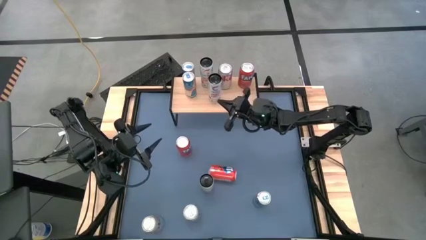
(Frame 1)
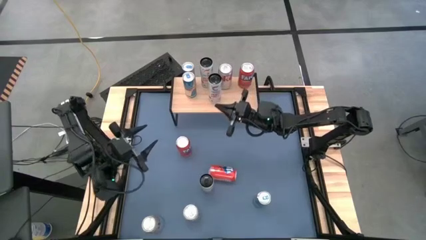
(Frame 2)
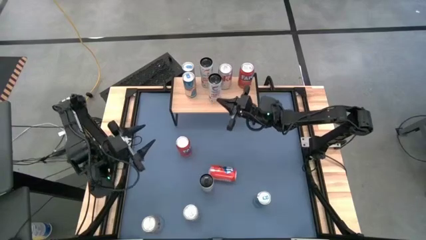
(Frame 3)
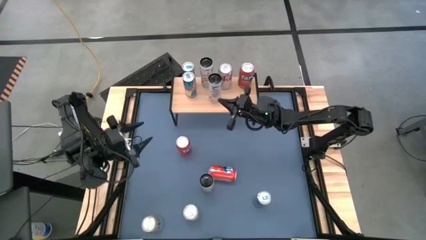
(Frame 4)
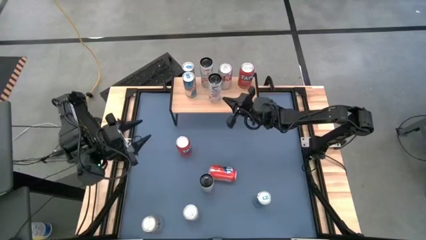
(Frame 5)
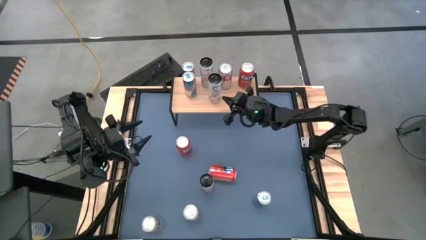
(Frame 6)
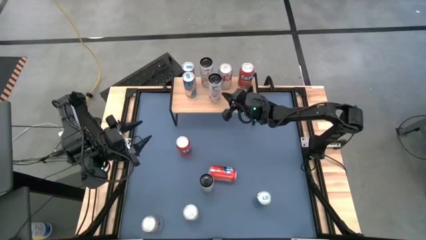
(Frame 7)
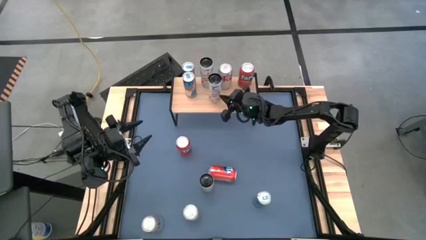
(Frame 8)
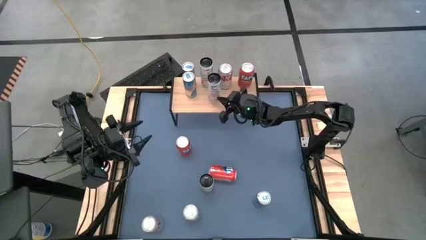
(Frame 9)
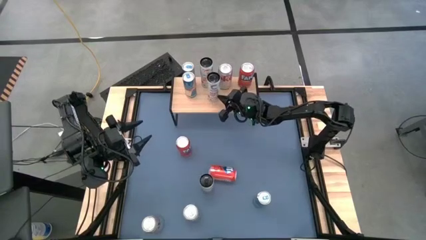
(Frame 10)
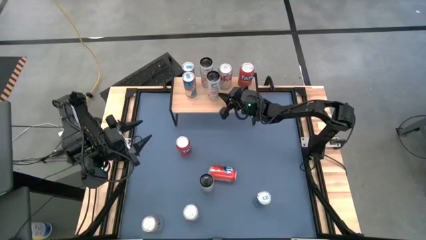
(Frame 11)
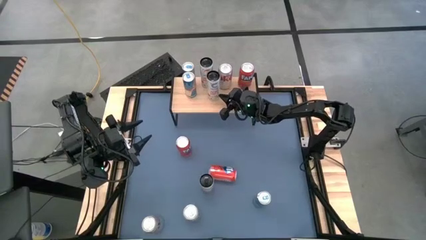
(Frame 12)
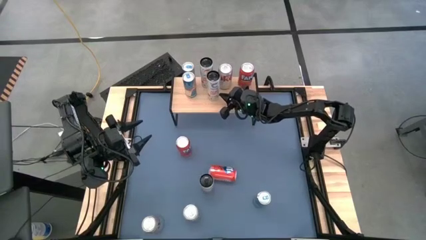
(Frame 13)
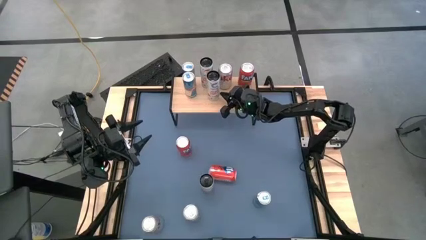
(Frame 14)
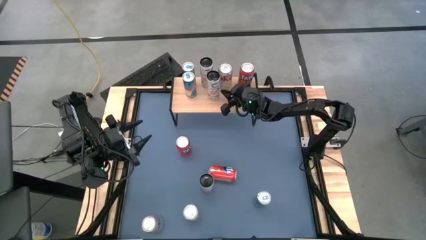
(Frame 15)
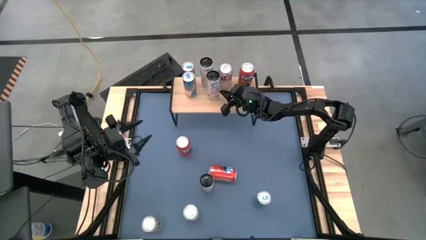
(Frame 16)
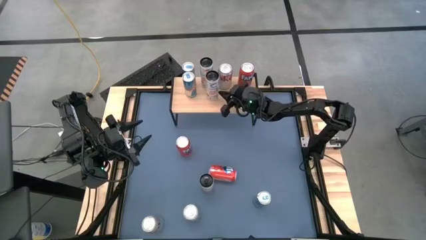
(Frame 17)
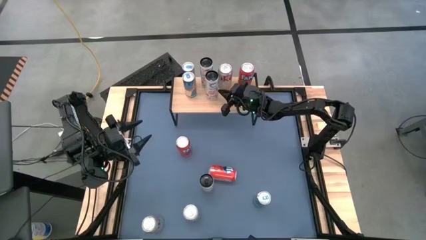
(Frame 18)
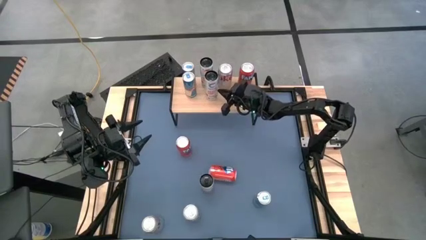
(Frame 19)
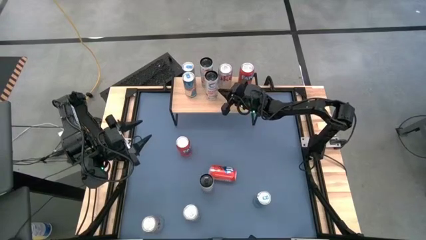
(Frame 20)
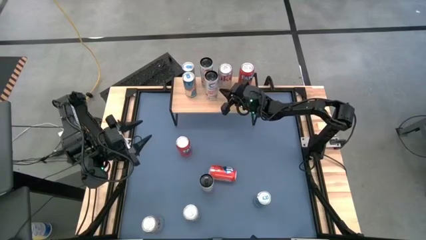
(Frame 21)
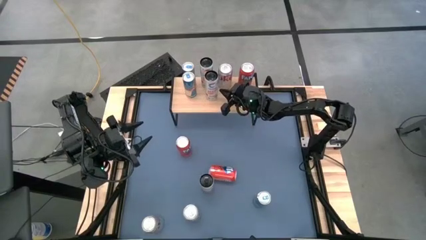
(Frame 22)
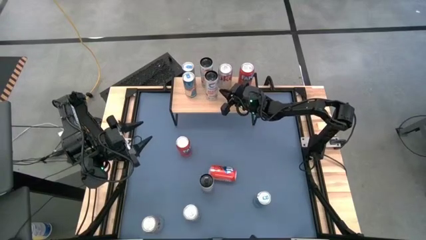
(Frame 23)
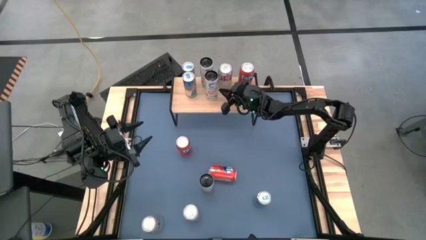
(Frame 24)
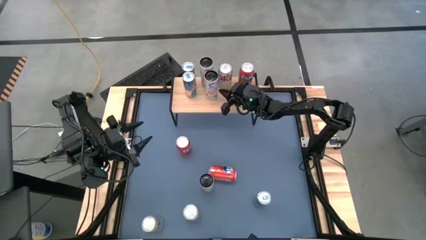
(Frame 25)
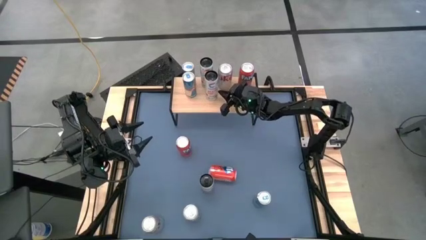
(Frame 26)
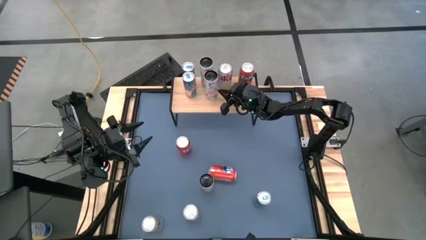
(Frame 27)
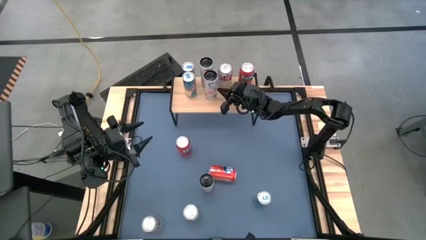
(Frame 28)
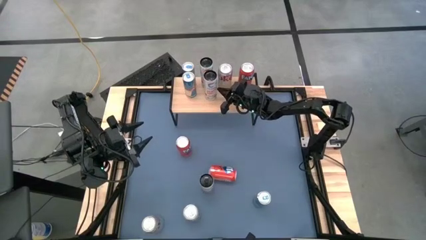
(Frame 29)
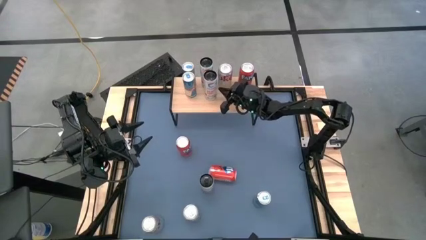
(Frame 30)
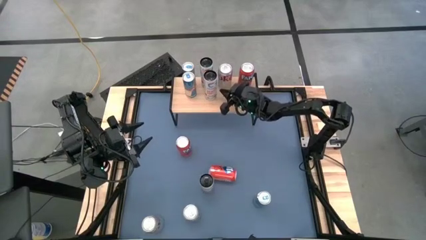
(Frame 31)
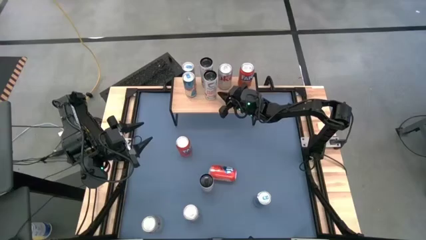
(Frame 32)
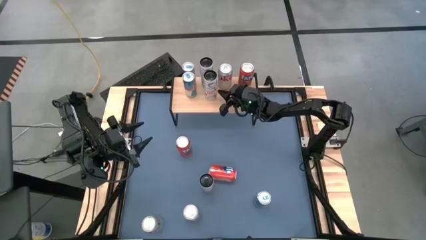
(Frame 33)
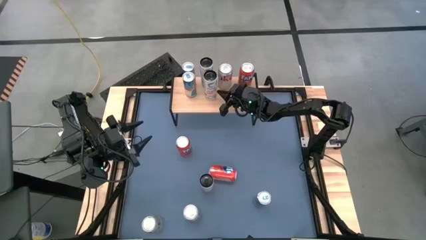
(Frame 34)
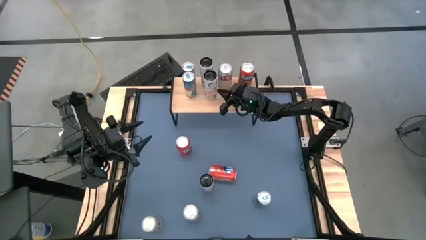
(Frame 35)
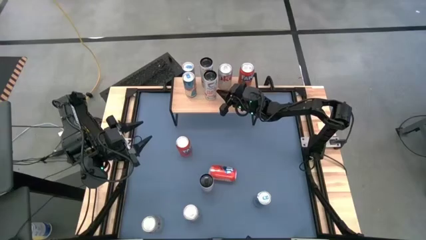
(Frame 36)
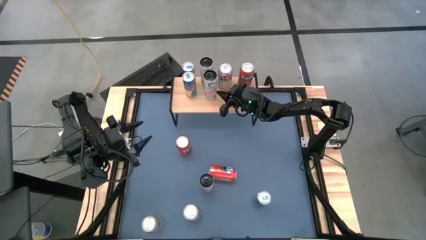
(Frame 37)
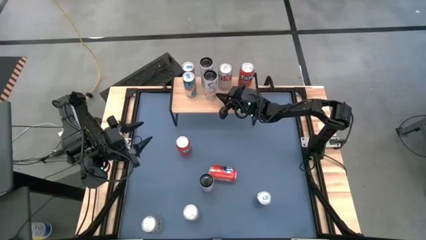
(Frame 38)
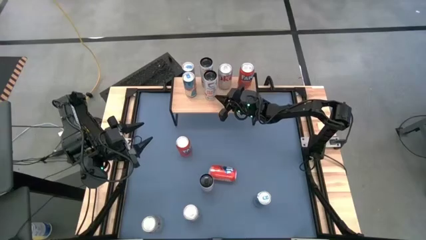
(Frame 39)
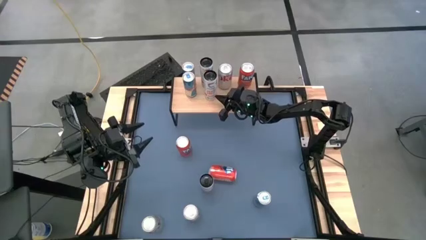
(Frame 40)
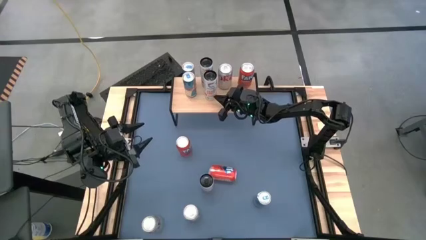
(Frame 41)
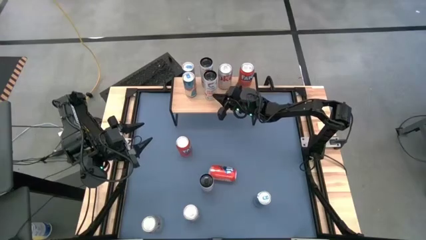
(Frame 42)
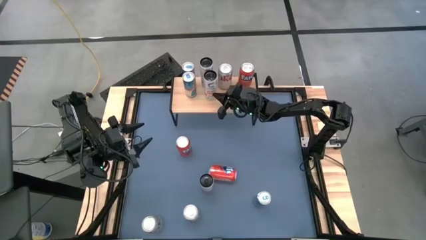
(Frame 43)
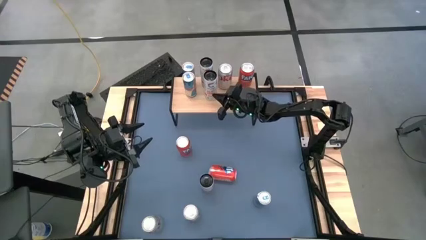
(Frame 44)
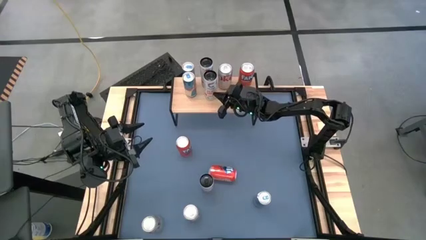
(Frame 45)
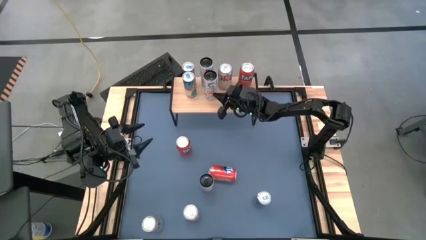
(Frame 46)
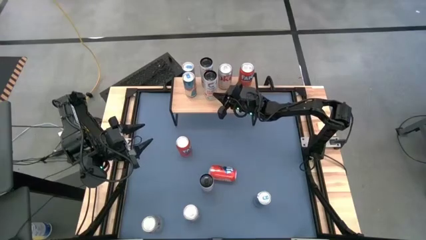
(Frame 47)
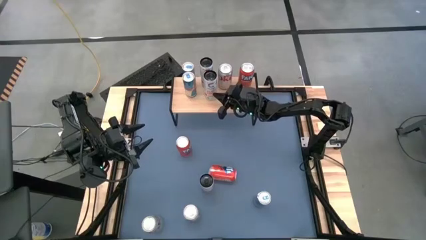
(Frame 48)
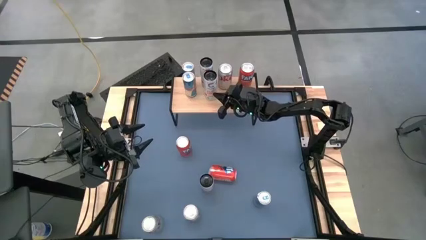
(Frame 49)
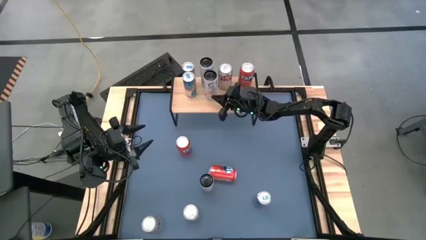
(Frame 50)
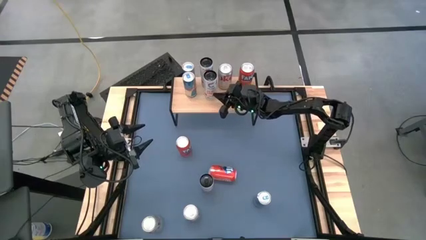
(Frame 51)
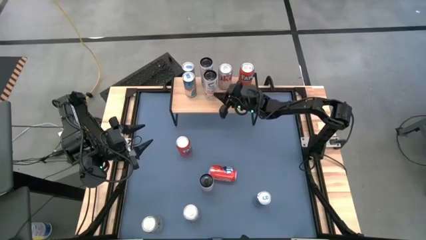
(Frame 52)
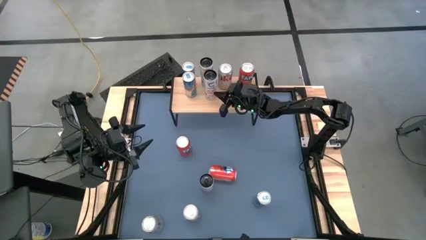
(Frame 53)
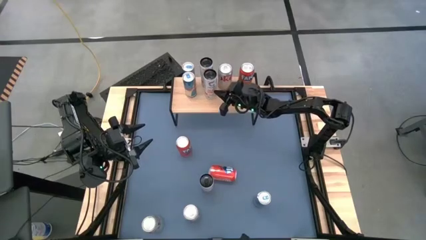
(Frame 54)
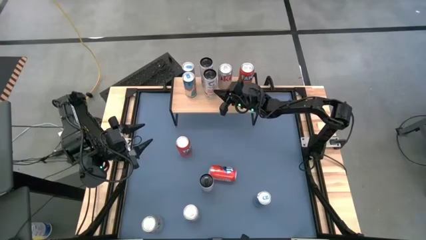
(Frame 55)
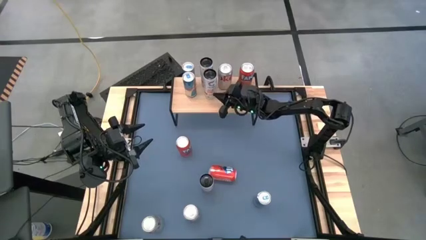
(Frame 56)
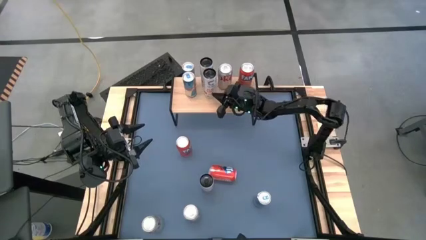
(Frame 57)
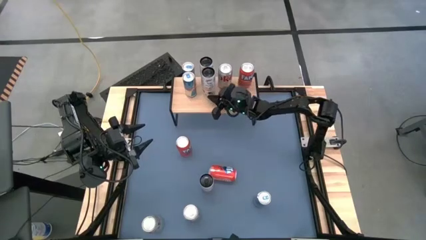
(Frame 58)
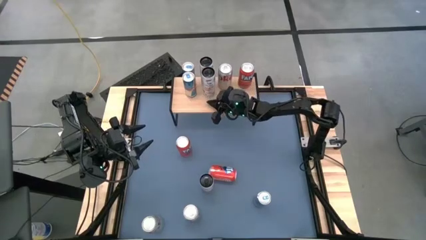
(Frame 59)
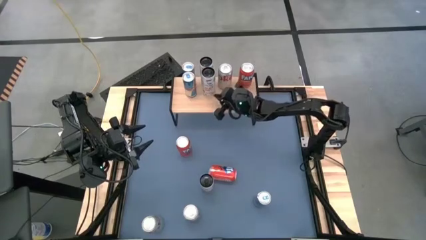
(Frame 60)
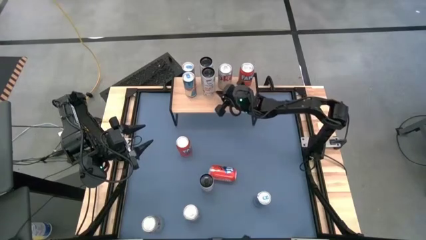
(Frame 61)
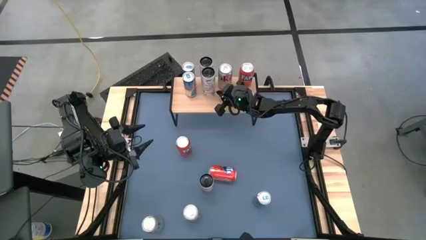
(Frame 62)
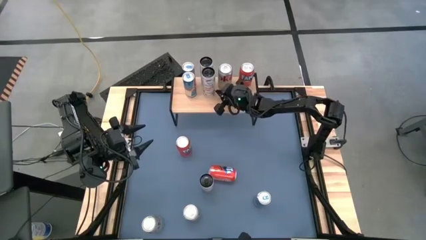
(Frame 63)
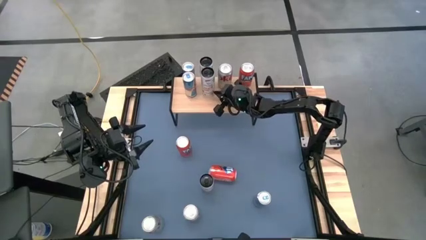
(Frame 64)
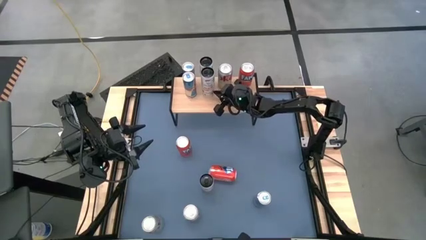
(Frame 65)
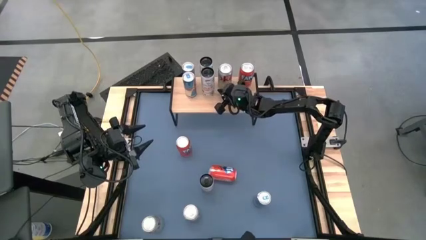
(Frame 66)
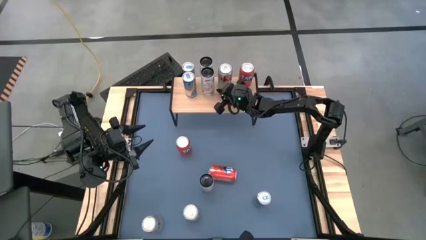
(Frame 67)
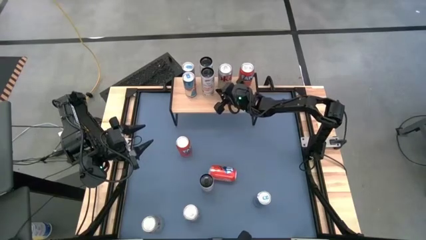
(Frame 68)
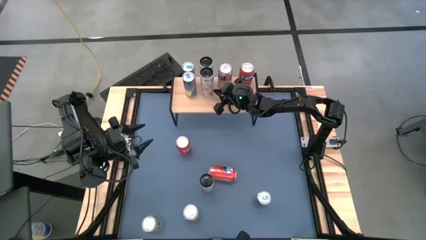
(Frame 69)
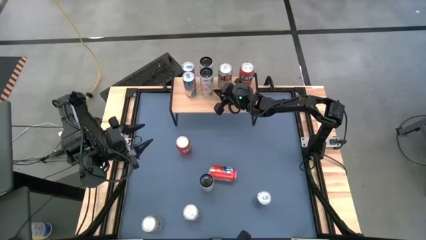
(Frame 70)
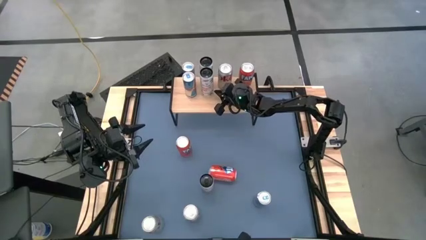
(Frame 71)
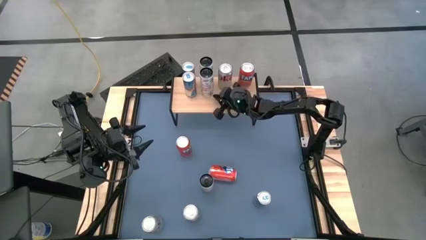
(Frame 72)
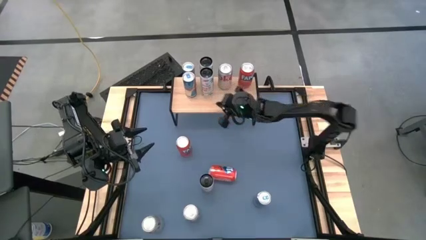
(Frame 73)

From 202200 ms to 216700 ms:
Task: Place canned beverage on shelf
Put the top right pink soda can on the shelf aligned with the other pink soda can
